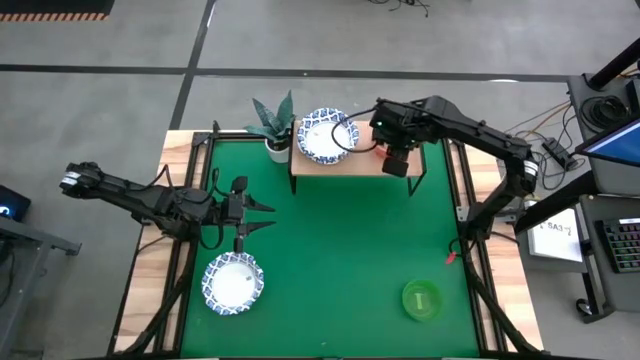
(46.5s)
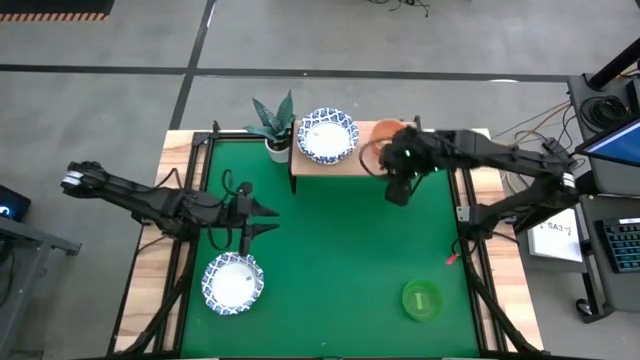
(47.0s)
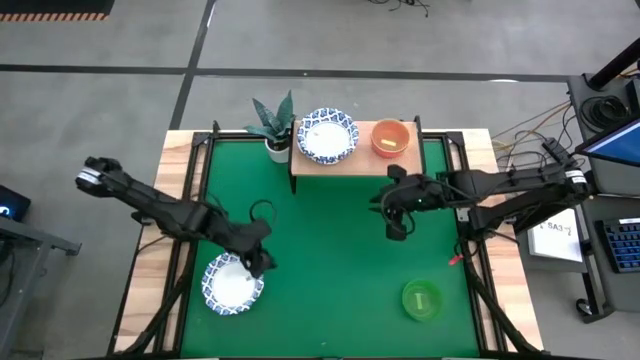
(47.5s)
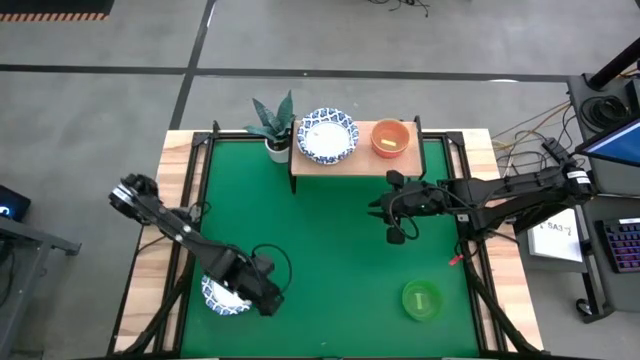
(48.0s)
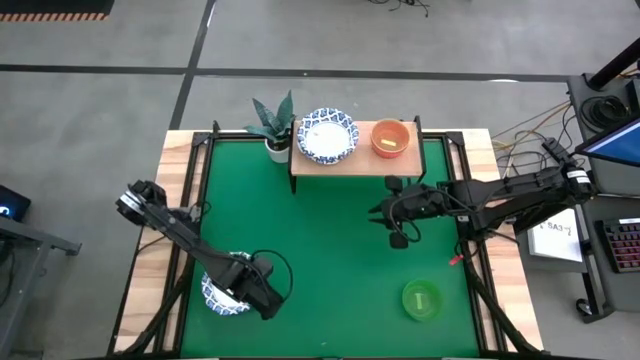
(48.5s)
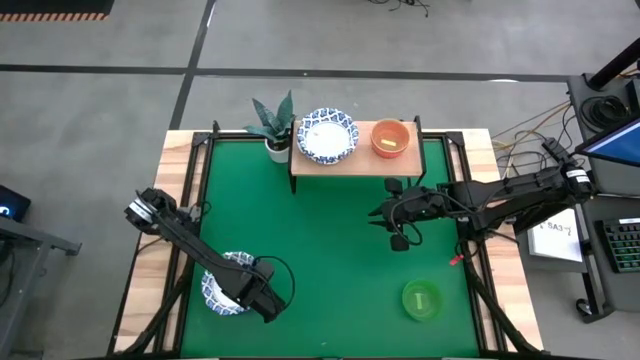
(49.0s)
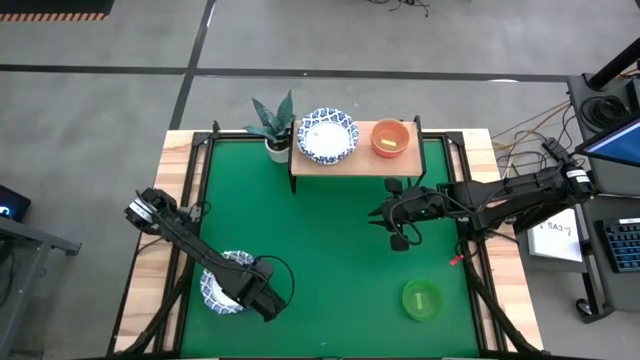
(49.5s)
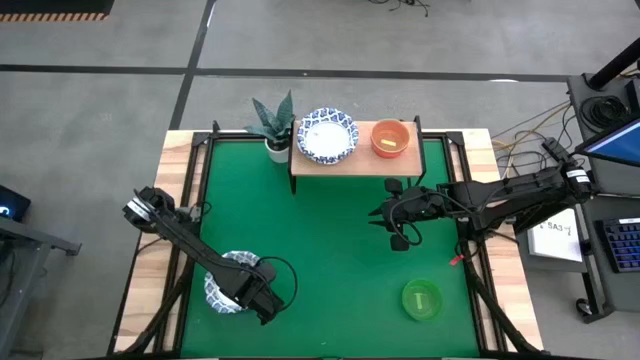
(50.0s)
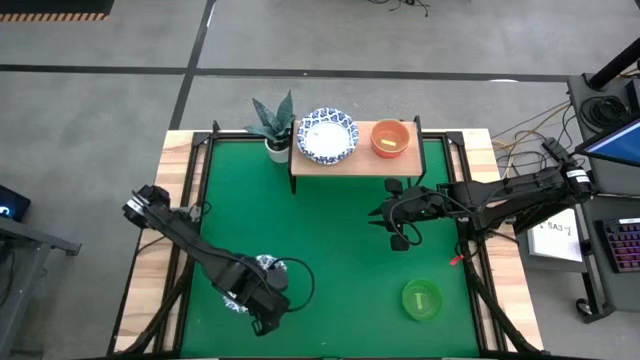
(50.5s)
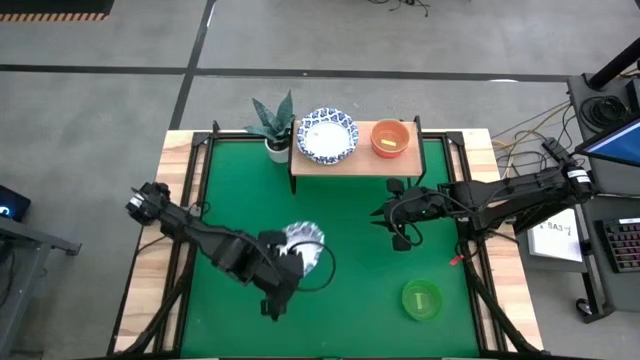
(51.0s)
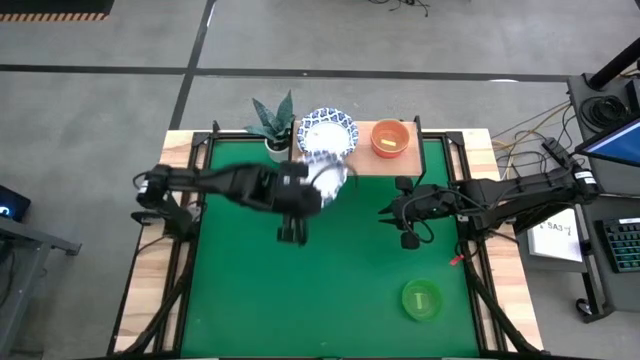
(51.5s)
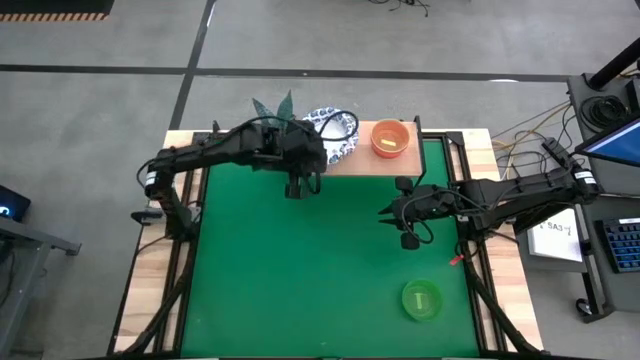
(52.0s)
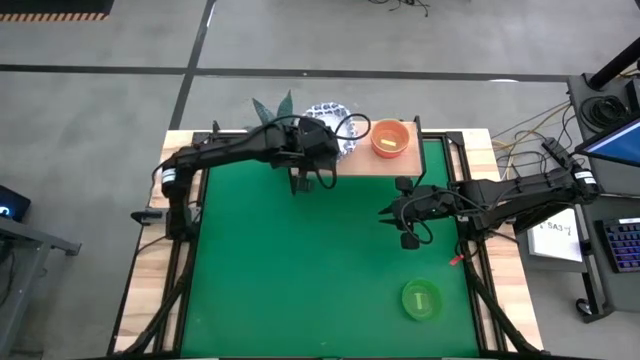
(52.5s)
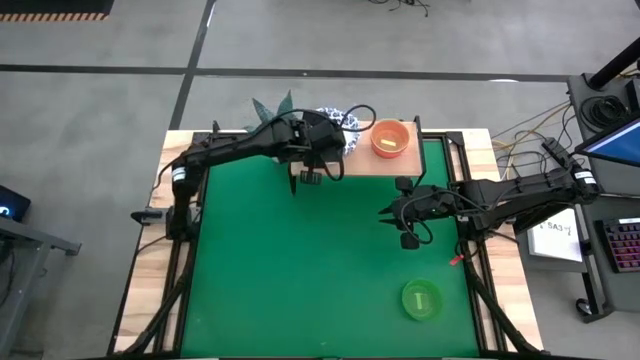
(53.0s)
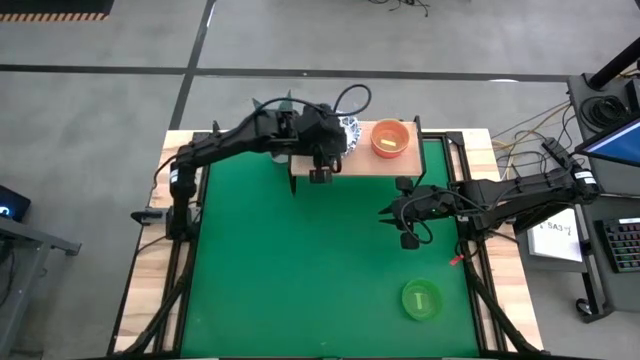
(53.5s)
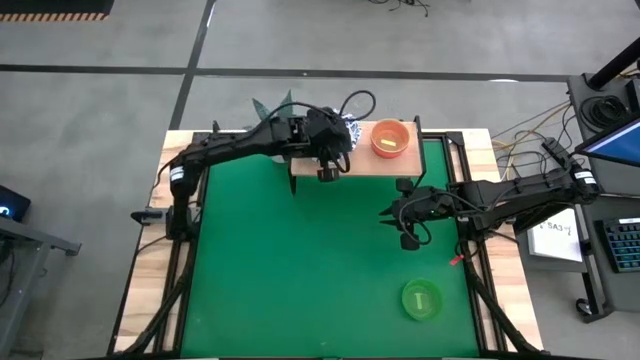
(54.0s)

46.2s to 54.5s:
Task: Place and stack bowls onto a shelf
Stack the white patterned bowl on top of the white patterned bowl on the shelf

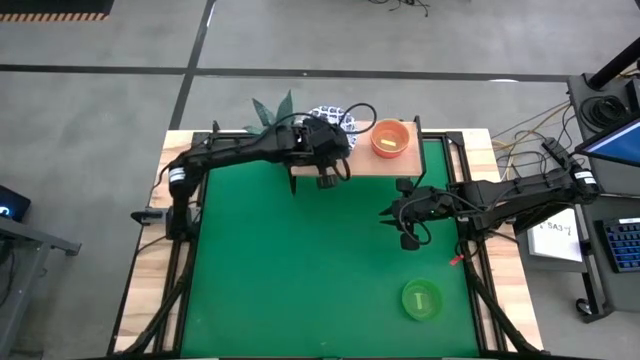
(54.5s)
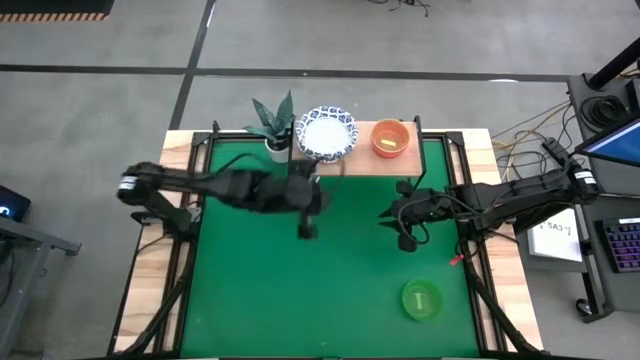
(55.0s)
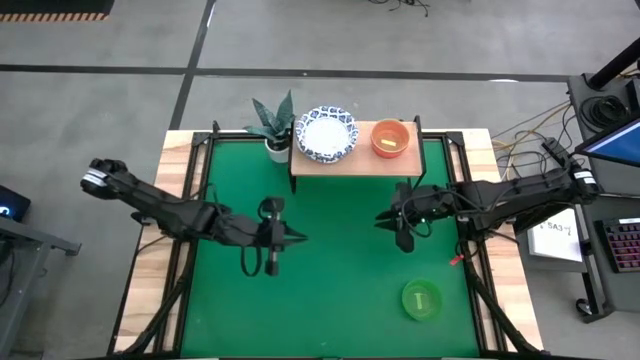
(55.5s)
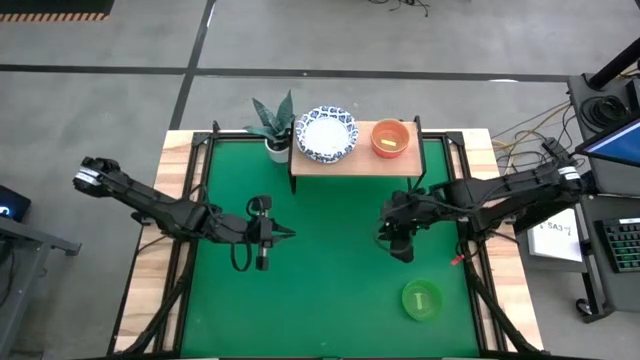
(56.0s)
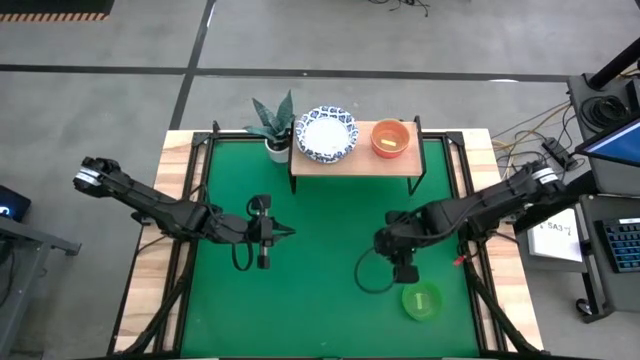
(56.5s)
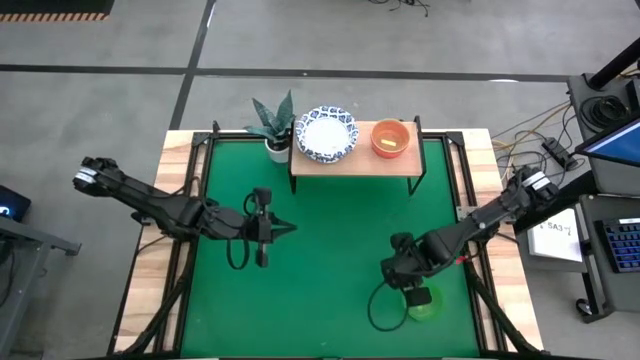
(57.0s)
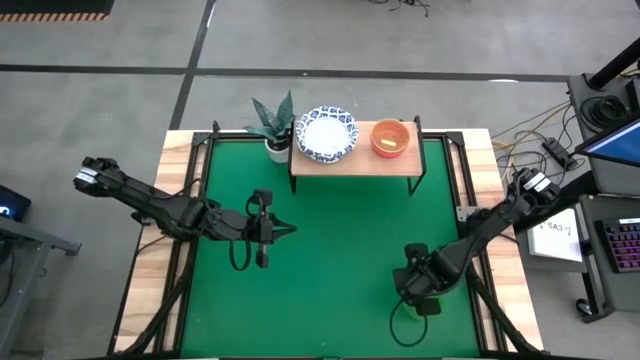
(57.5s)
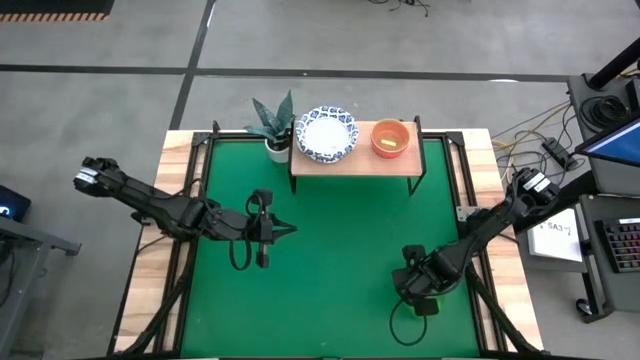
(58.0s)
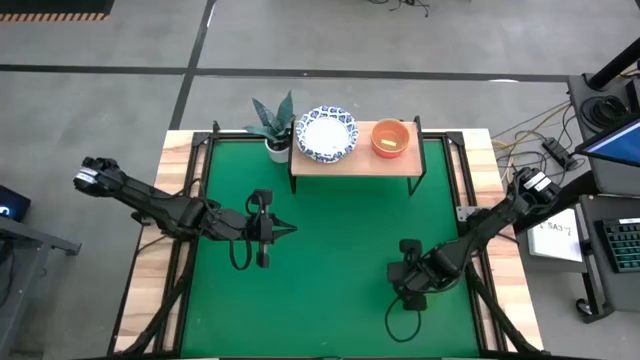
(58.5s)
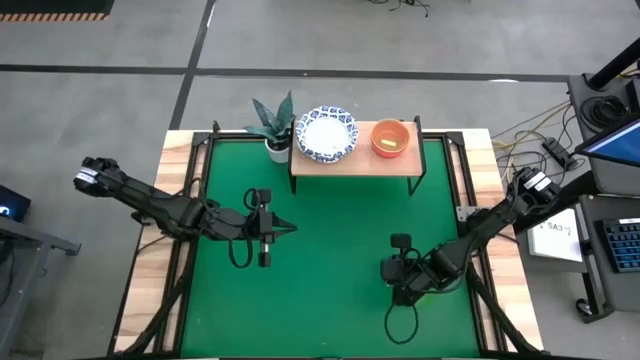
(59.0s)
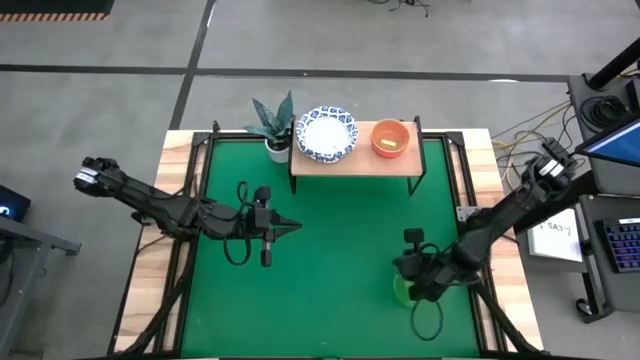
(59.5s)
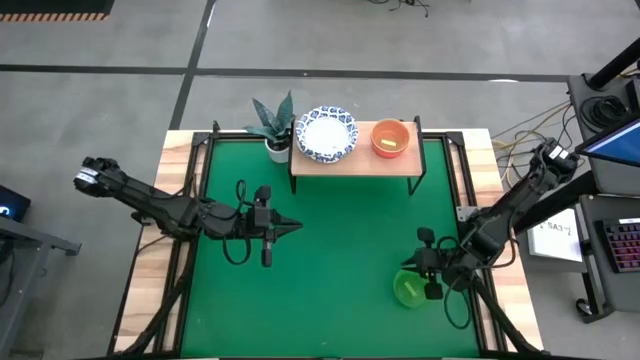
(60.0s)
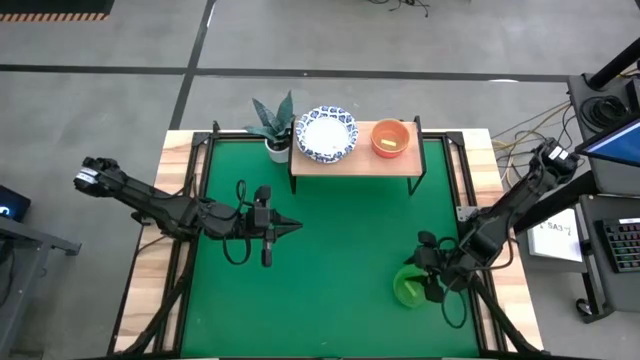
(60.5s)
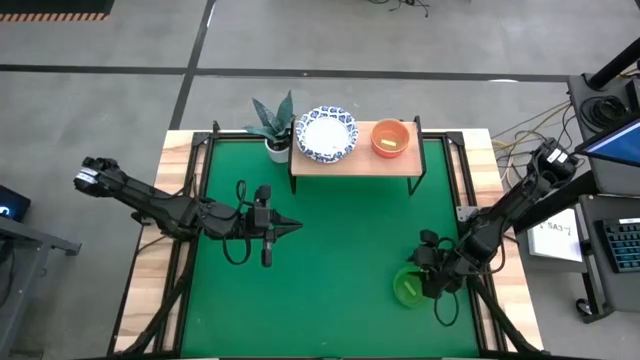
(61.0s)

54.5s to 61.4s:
Stack the green bowl on top of the yellow bowl on the shelf

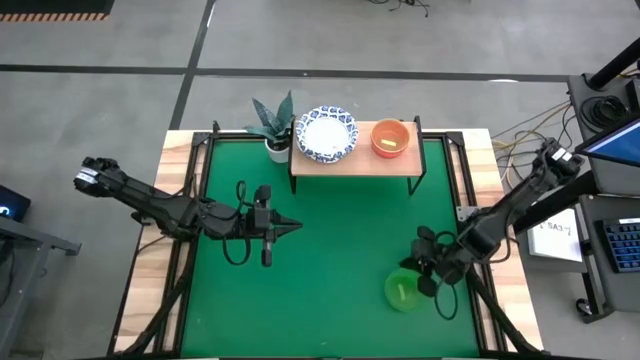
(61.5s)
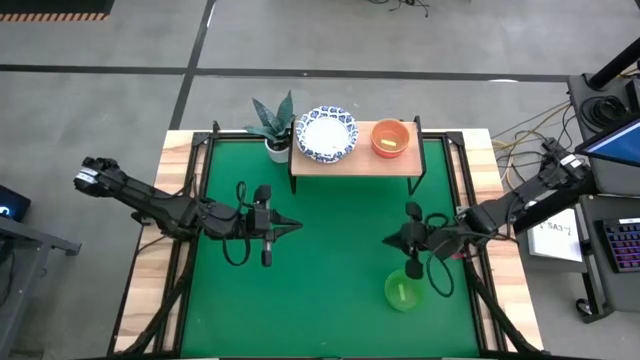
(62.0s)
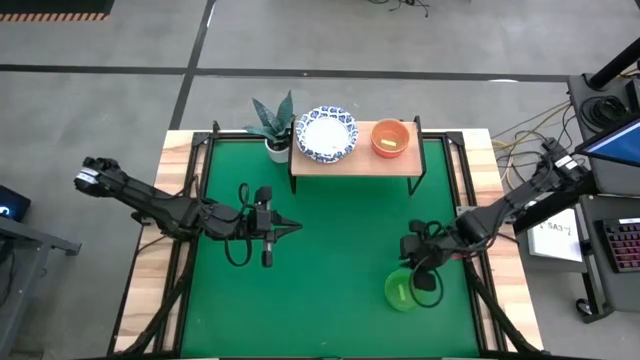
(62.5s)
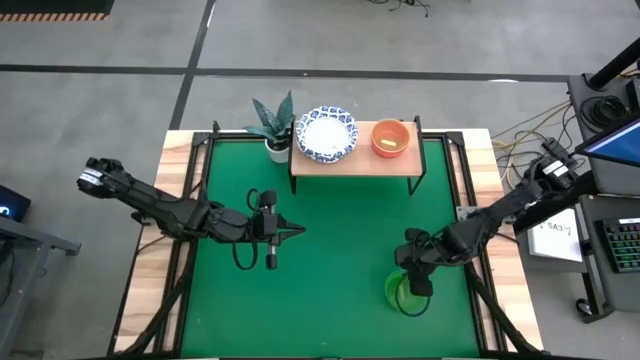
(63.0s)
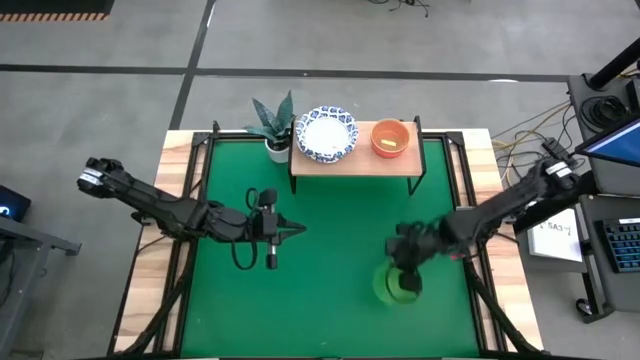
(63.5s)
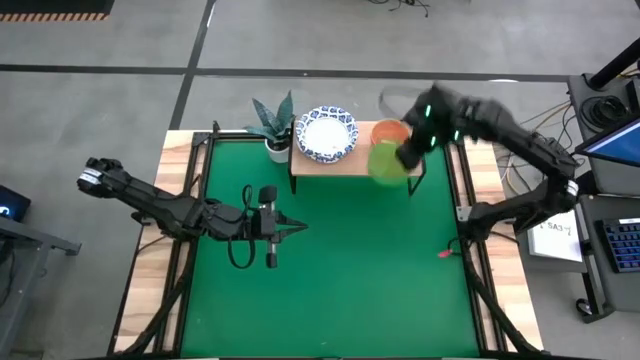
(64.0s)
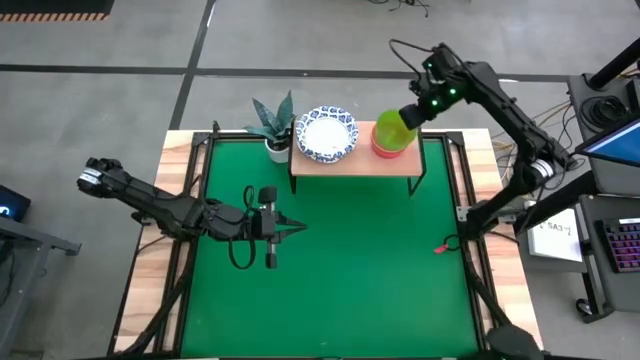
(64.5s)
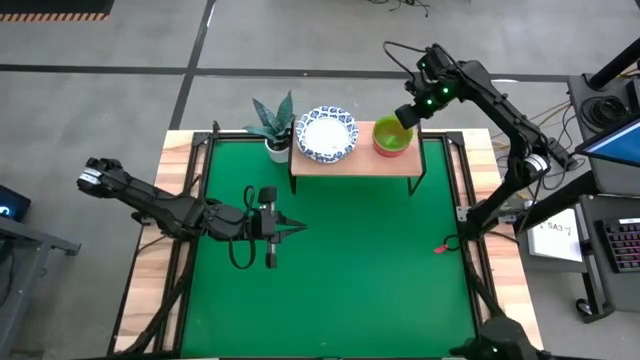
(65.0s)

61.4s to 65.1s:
Stack the green bowl on top of the yellow bowl on the shelf

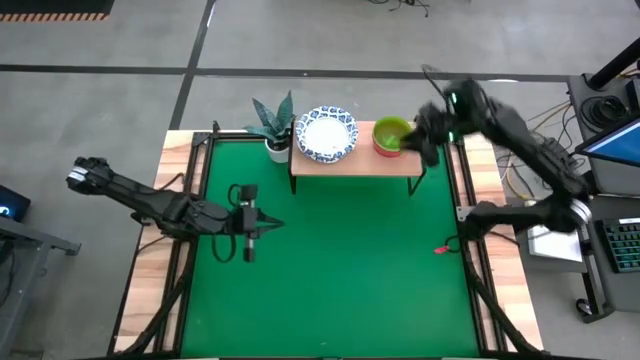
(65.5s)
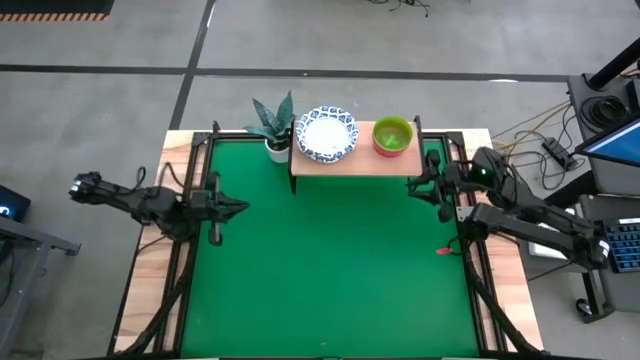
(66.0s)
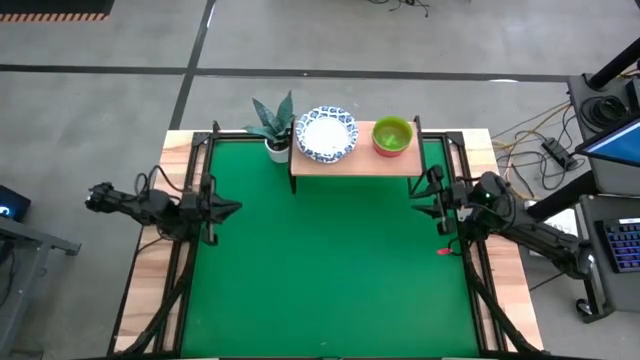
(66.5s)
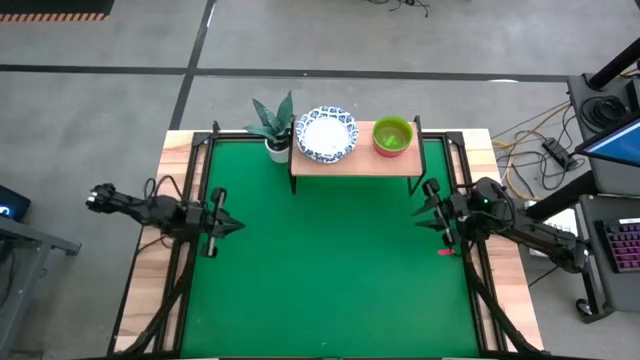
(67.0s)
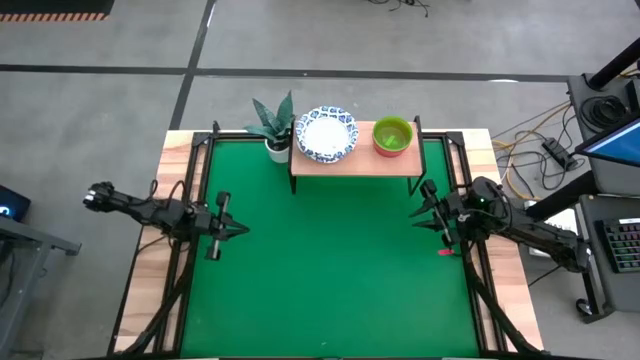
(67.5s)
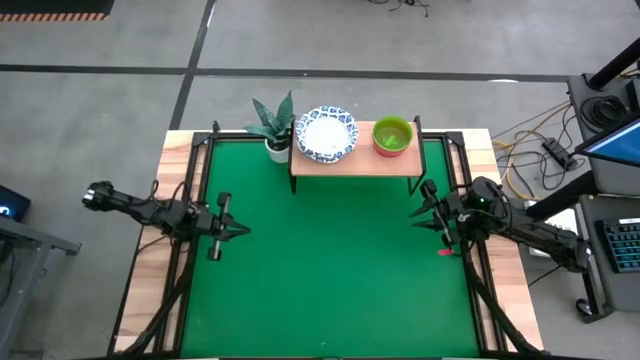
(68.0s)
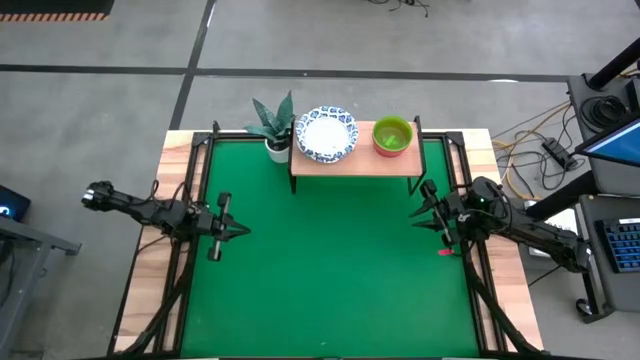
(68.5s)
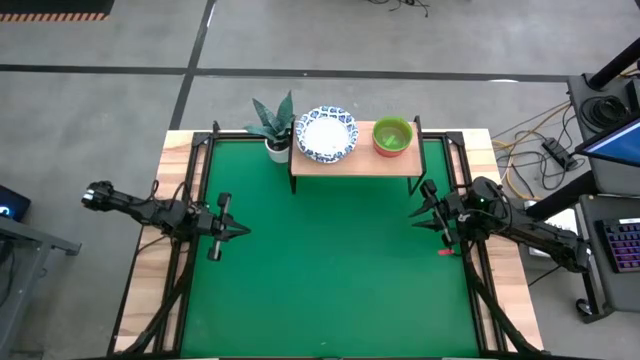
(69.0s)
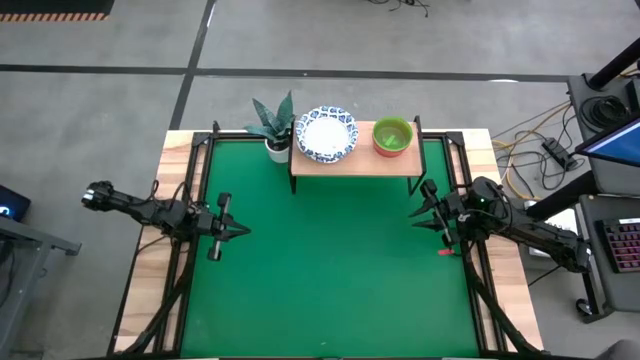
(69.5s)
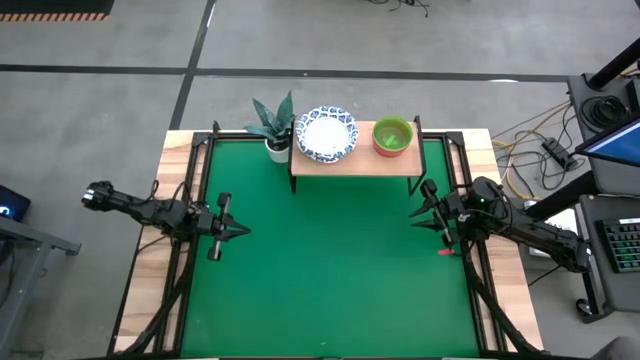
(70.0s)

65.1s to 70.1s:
Return to Home Position
